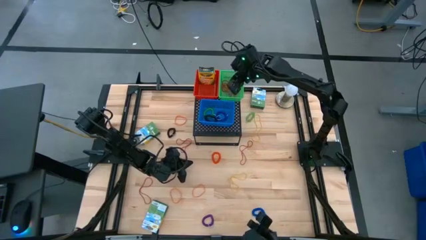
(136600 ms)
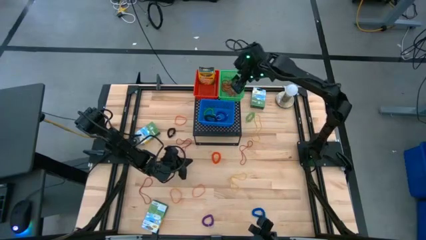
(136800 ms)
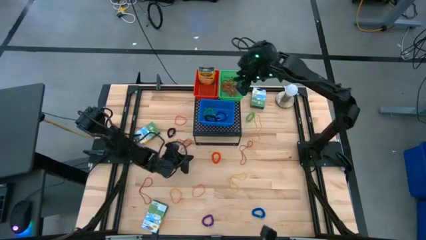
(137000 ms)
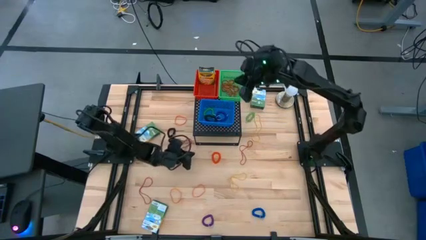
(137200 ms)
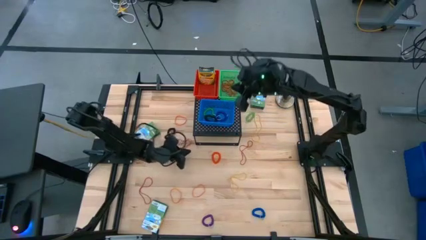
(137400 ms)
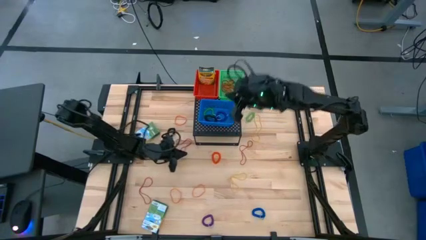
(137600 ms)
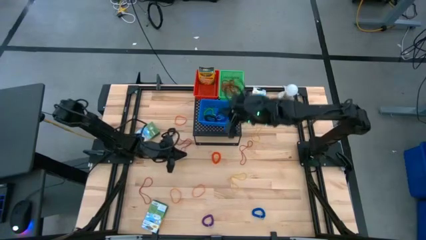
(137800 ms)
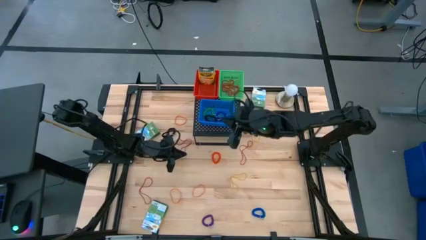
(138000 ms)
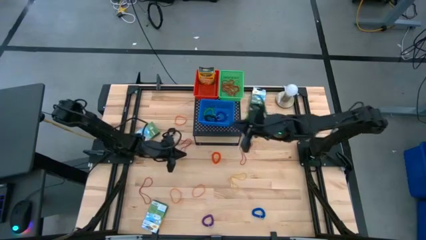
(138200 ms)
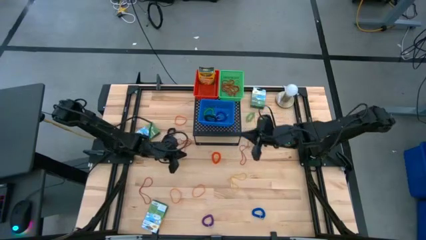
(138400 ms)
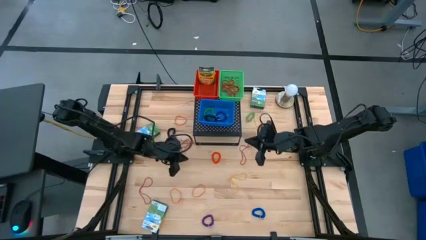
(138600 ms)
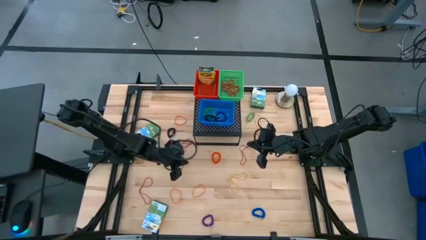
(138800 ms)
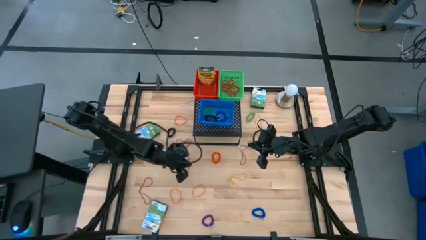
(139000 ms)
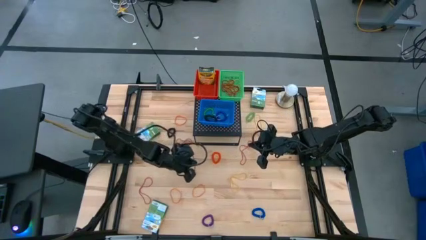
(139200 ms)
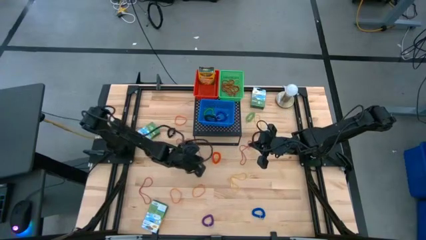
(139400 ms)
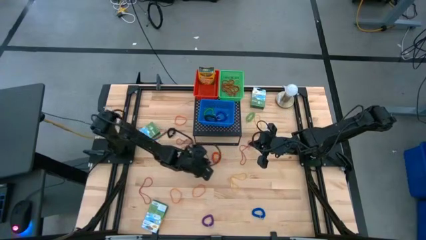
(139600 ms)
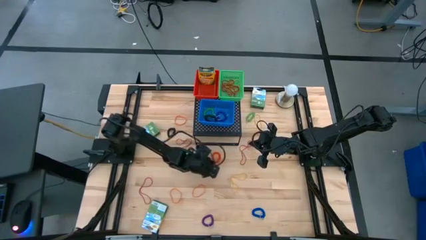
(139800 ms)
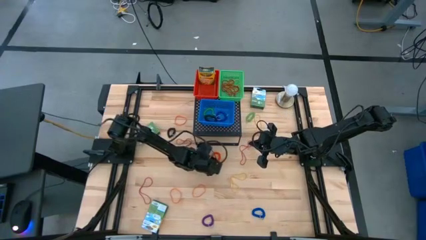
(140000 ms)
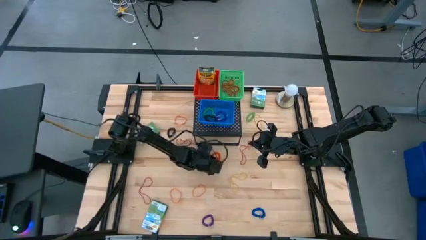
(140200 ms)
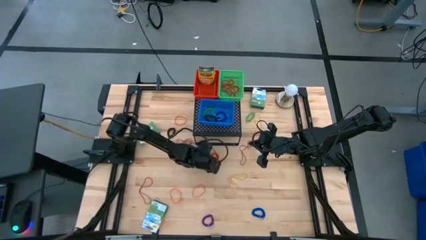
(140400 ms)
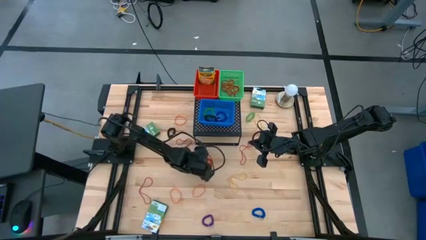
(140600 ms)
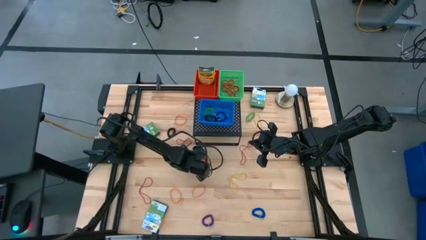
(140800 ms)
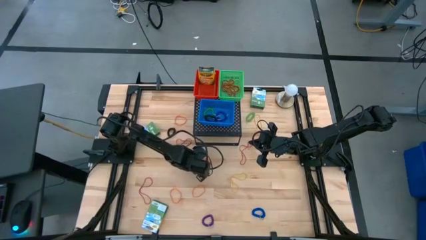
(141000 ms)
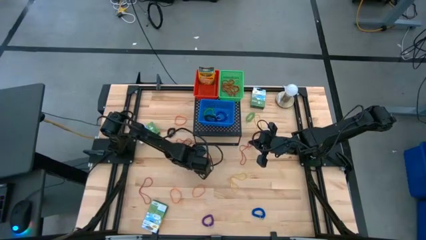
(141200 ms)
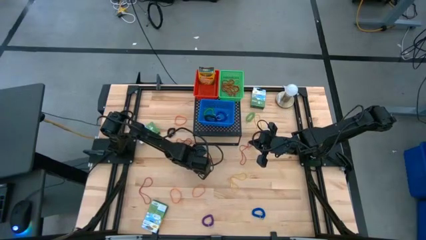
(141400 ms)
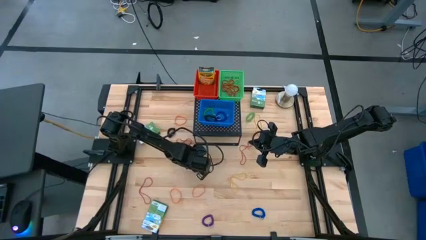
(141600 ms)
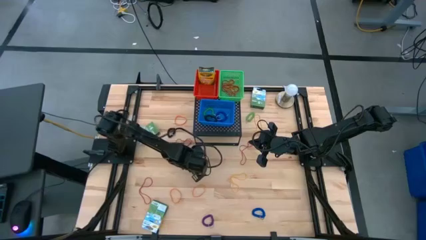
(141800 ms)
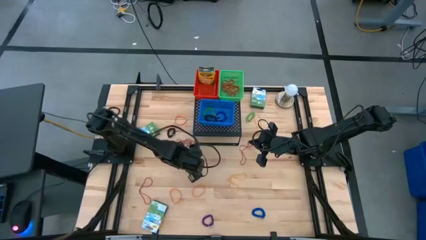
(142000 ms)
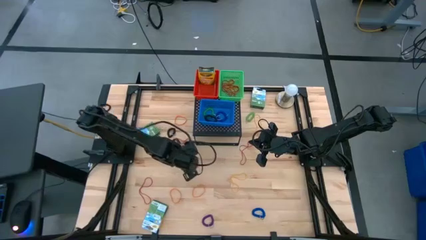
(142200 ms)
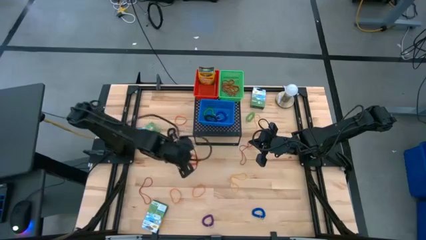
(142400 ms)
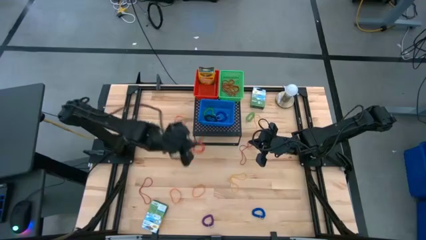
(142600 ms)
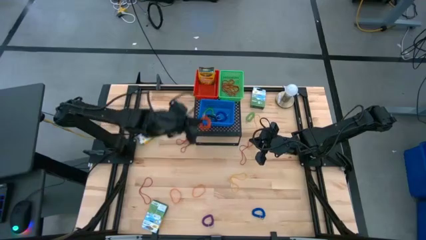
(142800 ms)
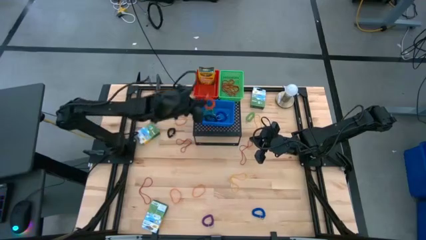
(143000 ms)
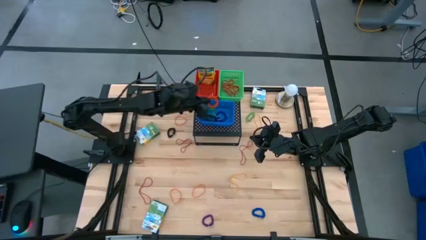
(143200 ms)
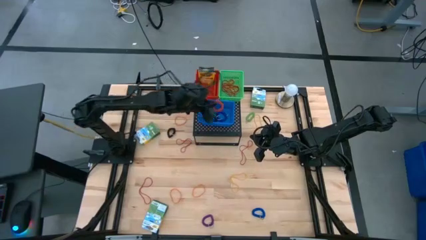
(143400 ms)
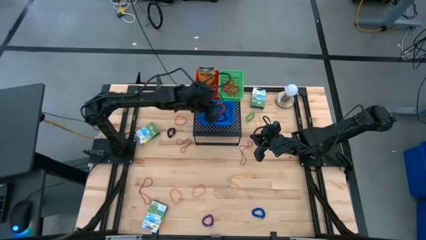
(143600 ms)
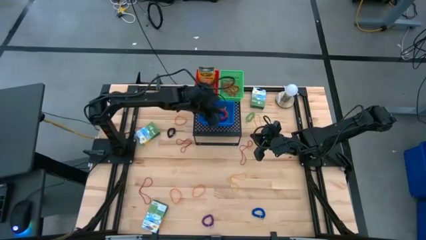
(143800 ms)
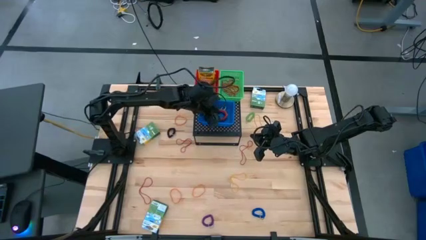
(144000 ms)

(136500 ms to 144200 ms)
Task: Pick & Place Office Desk Supplies
Put the orange spring keychain into the blue bin on the shelf

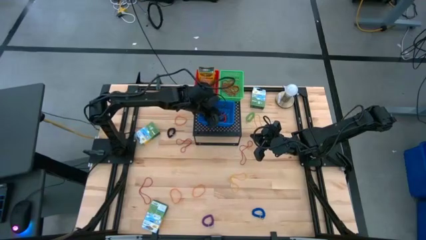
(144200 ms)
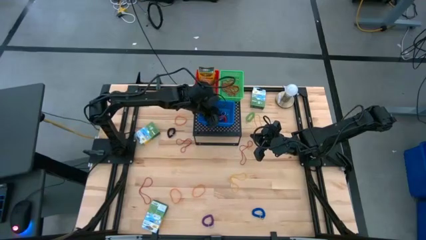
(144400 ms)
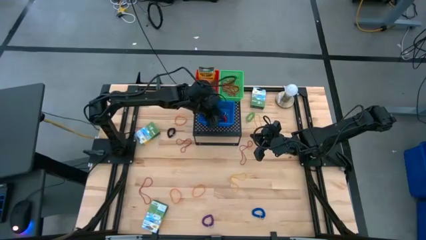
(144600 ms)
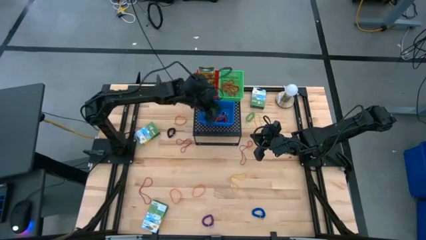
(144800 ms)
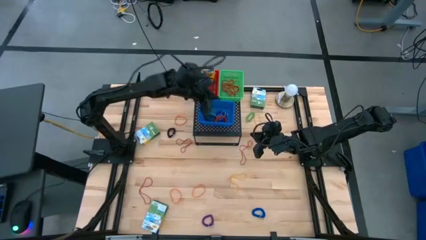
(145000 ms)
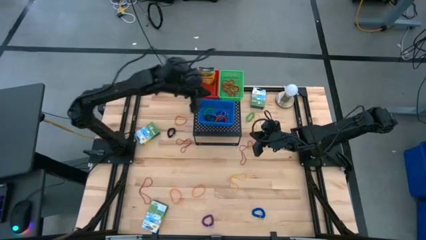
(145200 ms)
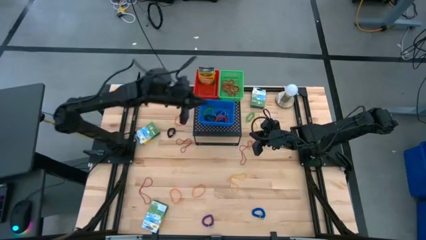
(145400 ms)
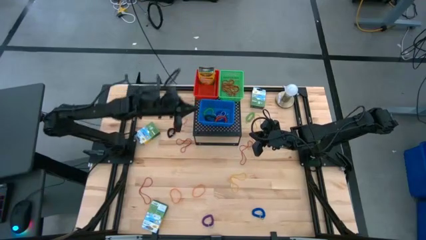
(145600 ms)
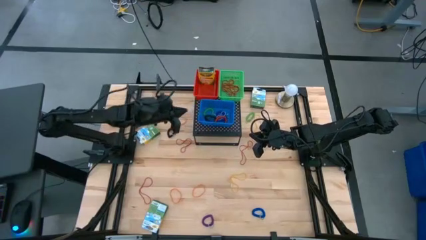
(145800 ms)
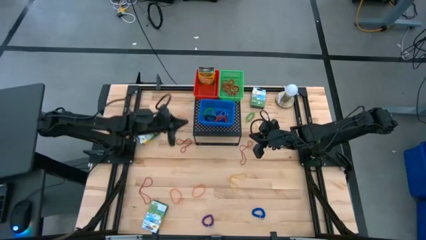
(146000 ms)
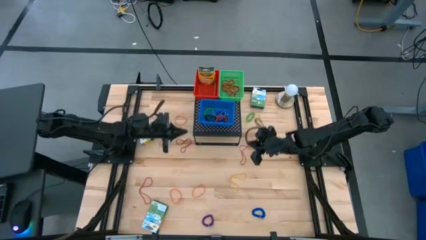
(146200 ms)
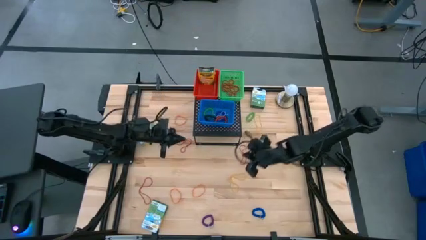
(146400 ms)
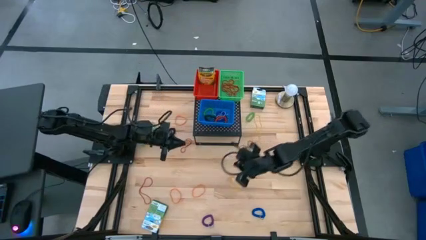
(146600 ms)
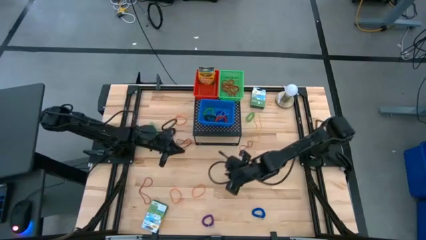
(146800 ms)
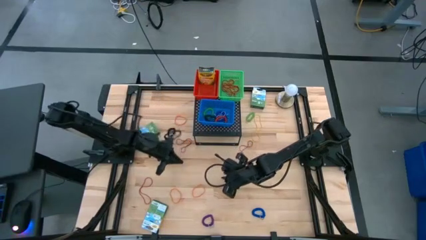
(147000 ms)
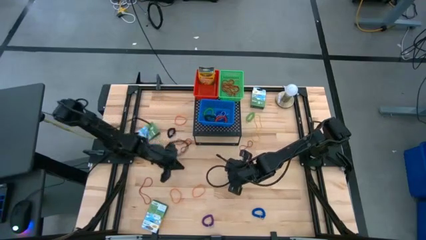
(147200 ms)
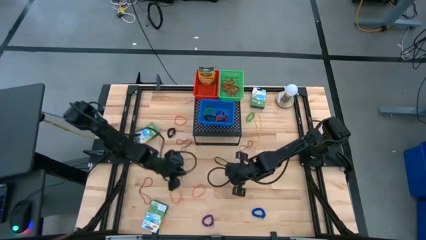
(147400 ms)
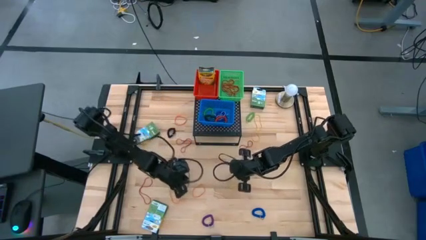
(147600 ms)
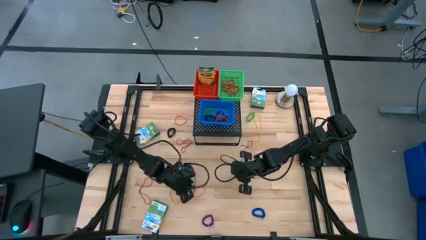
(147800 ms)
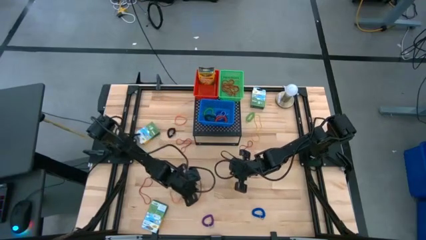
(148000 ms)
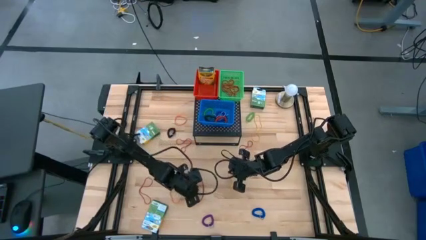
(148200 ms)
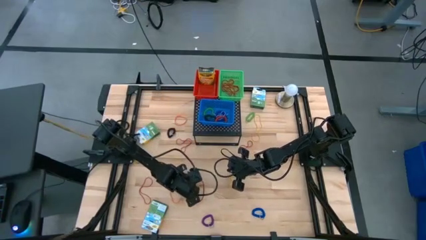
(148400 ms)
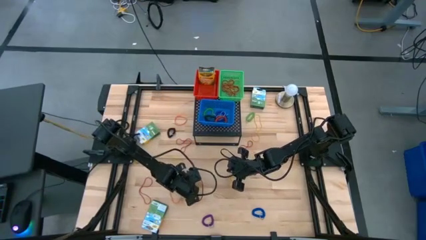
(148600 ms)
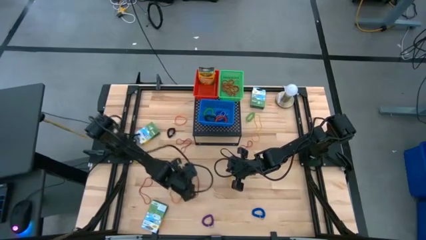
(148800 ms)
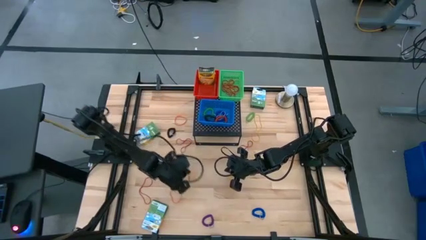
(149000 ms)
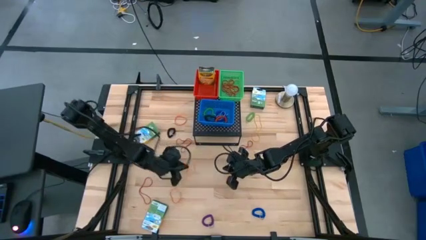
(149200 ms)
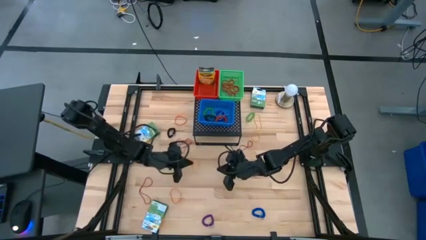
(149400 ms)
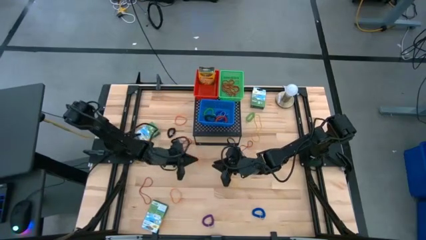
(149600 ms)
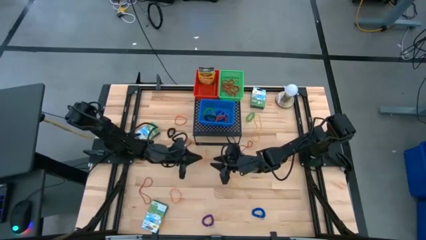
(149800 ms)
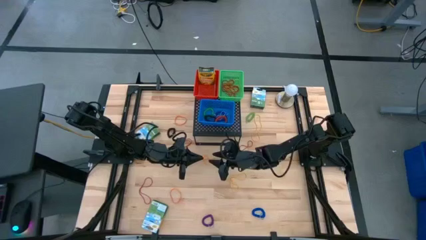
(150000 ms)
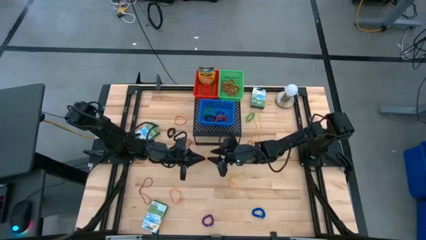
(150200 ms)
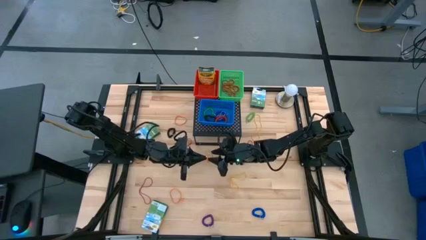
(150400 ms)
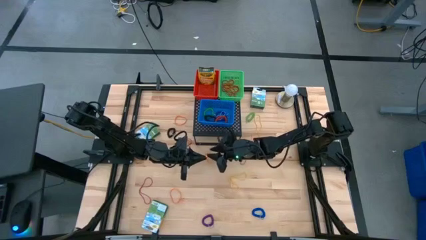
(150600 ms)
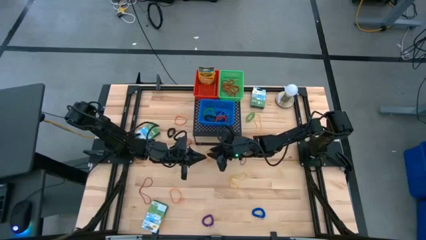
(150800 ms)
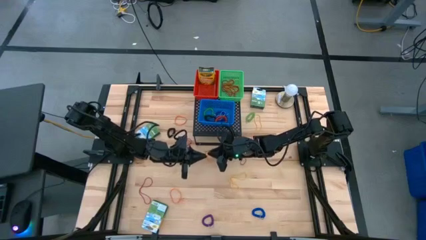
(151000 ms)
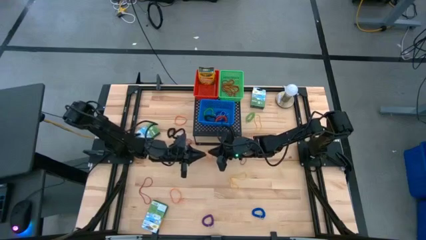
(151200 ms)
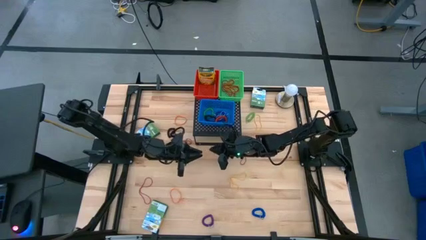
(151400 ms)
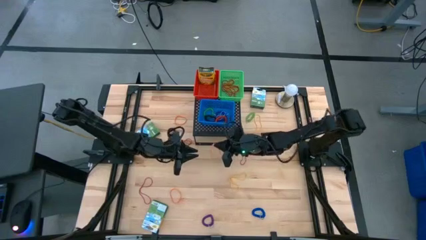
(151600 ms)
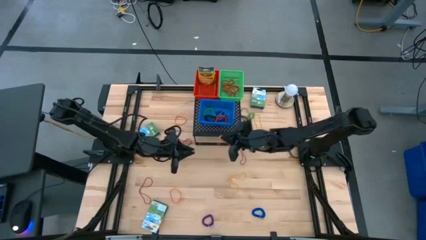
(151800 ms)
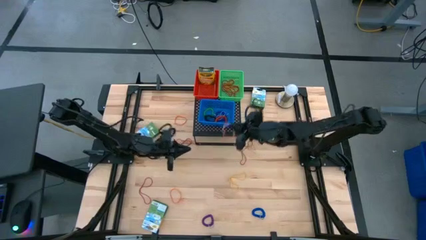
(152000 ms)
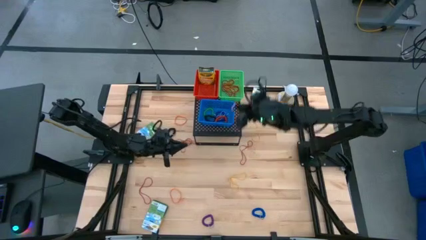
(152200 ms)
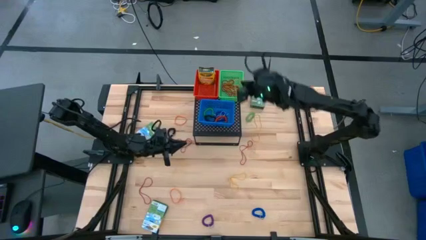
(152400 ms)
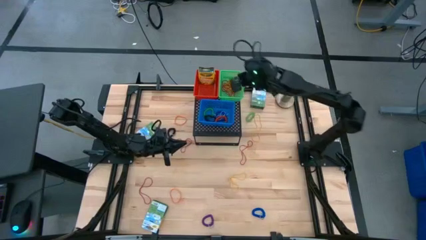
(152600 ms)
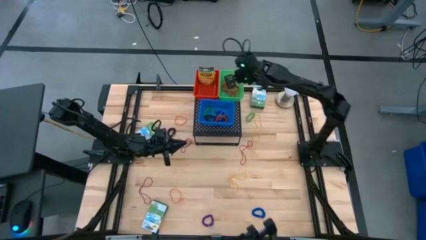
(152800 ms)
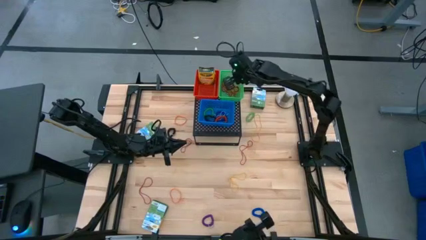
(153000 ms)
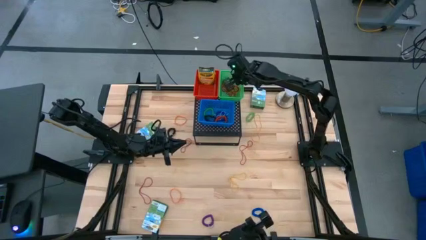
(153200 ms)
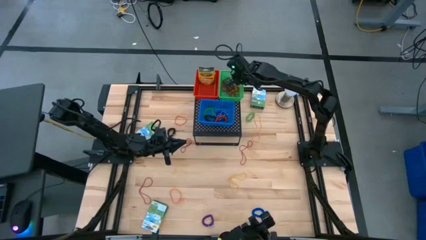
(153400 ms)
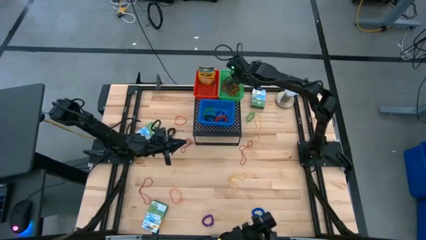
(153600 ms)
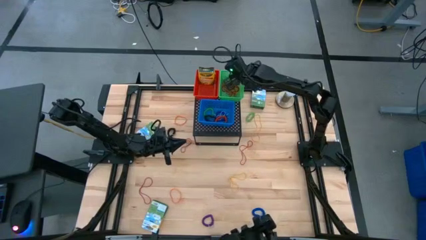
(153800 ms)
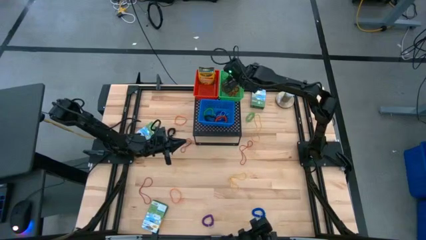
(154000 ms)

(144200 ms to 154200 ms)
Put the orange rubber band into the green bin on the shelf
